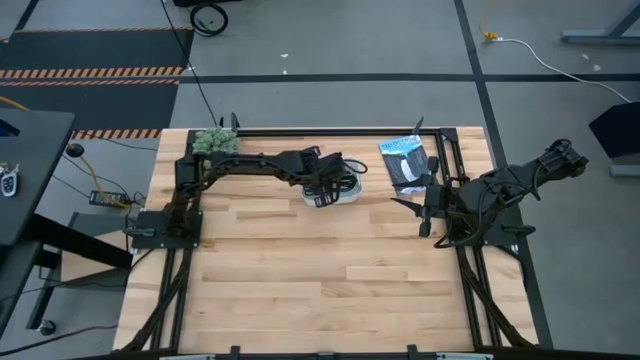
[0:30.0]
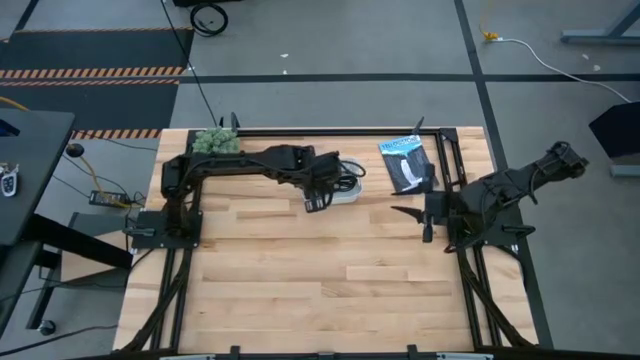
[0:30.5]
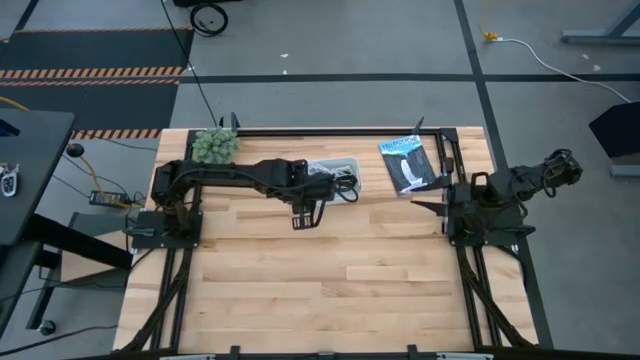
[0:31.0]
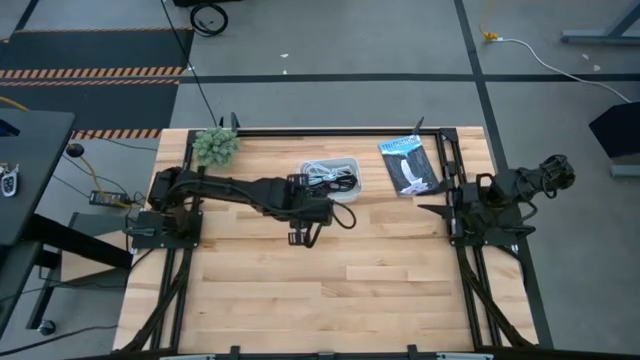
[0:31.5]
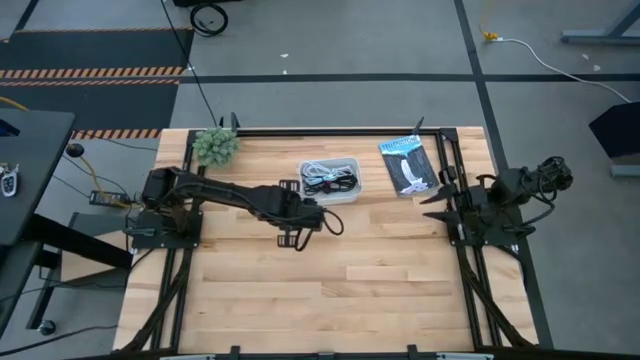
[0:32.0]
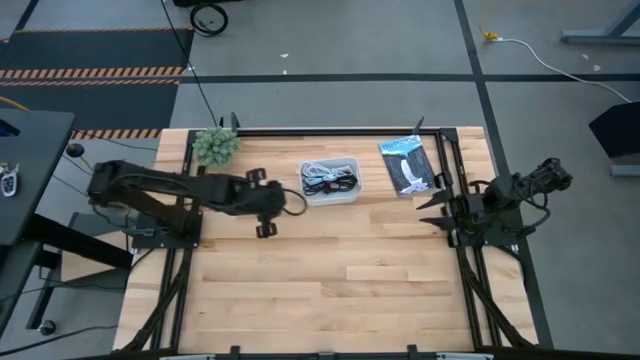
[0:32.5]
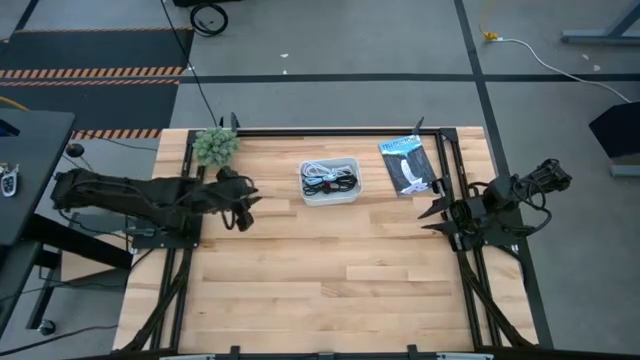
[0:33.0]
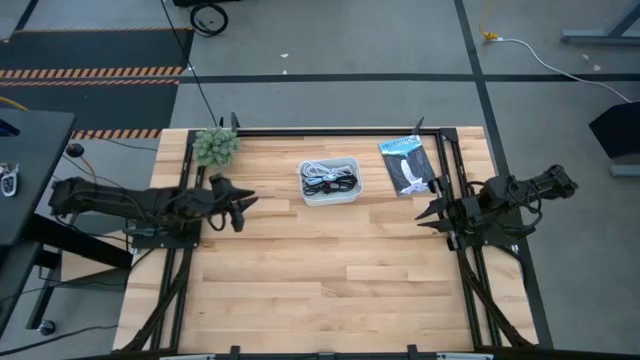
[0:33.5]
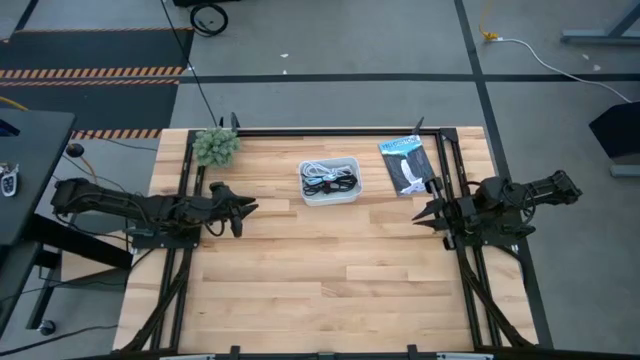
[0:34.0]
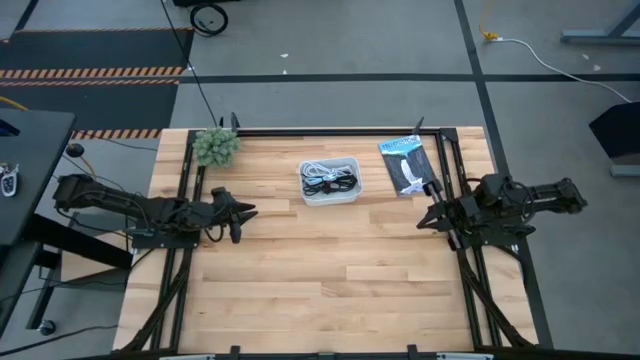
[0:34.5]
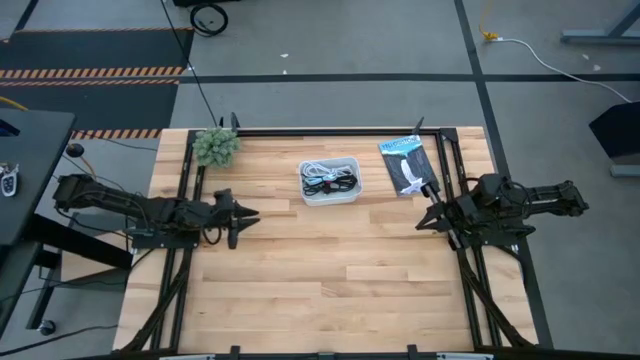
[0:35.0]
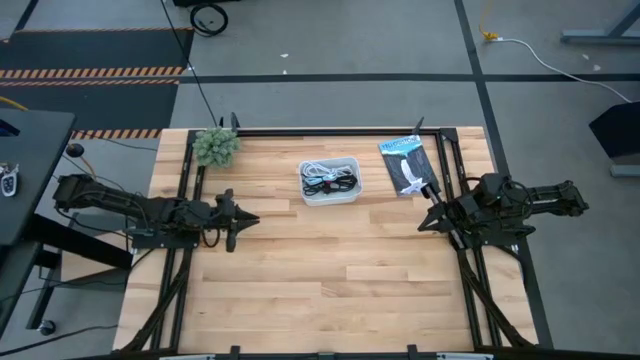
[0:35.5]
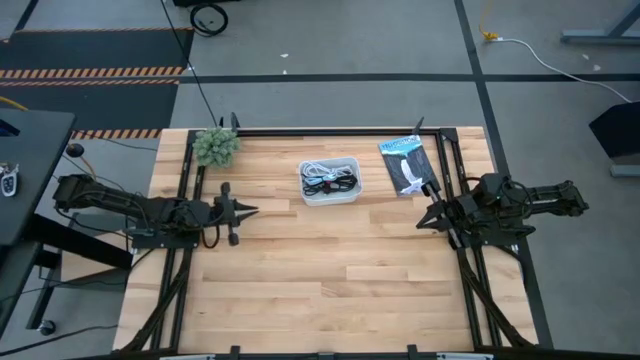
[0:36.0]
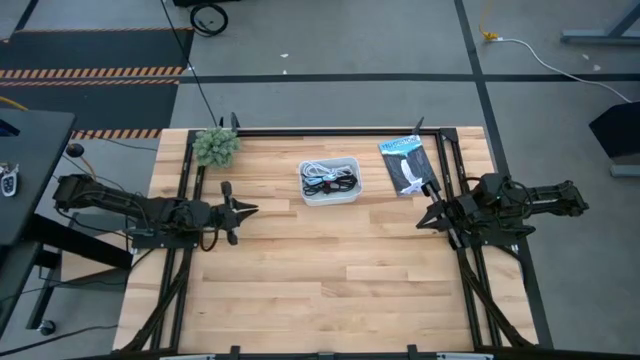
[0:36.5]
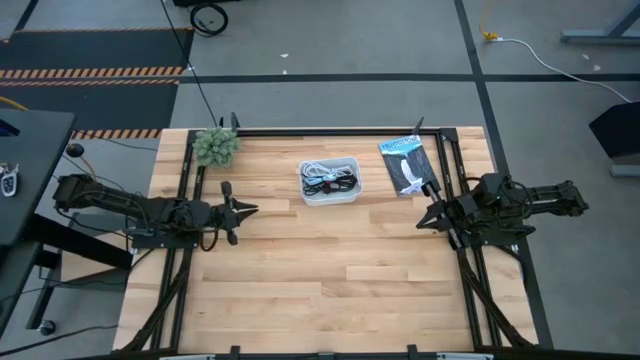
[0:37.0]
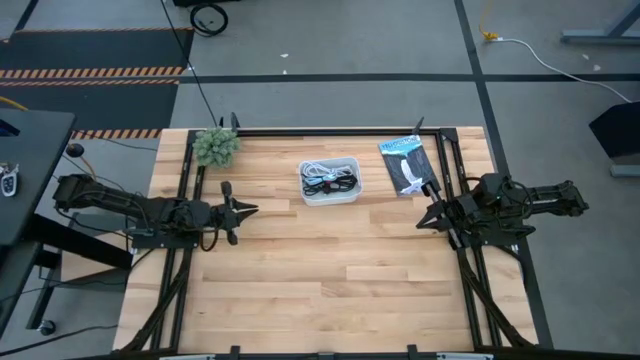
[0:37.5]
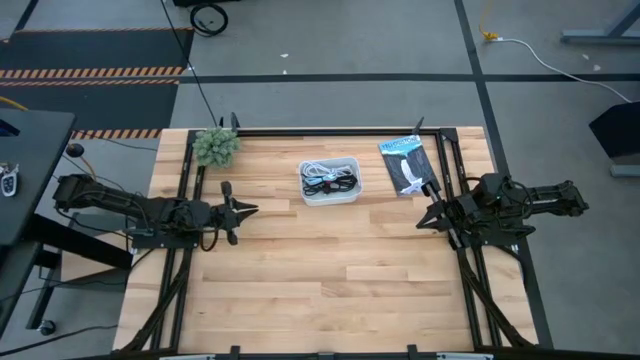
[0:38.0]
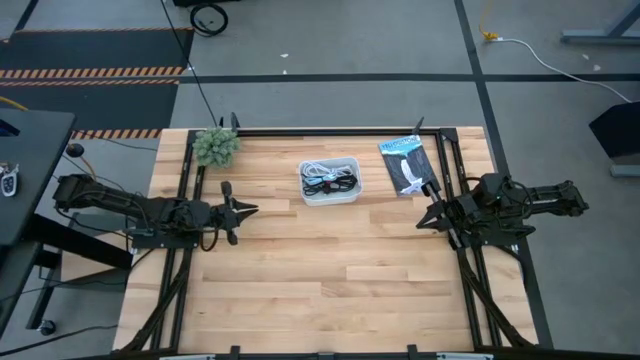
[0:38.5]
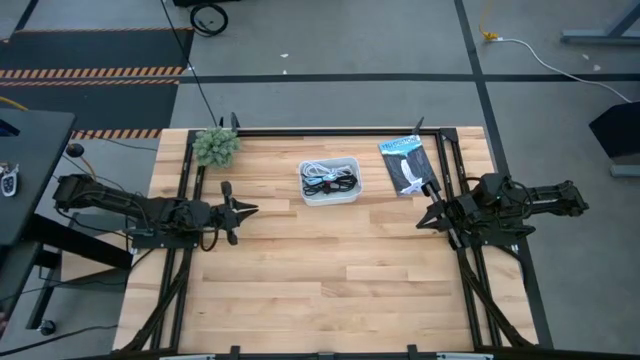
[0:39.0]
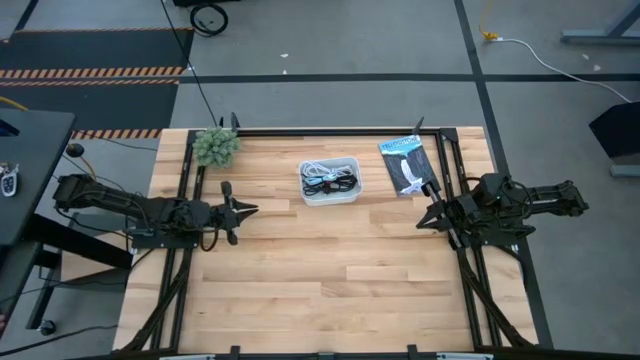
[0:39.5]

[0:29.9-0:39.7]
Task: Pick and place USB-C Cables
Return to Home Position

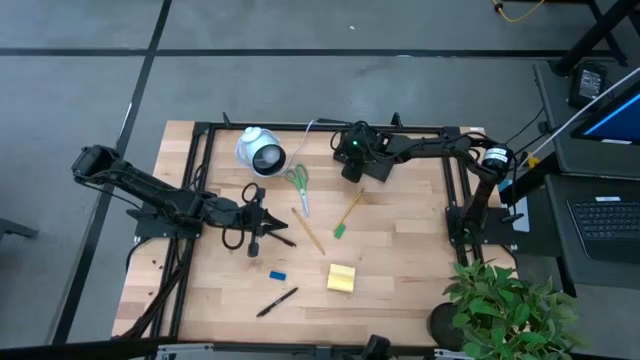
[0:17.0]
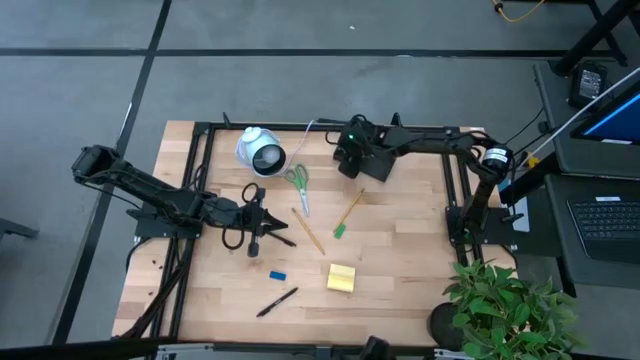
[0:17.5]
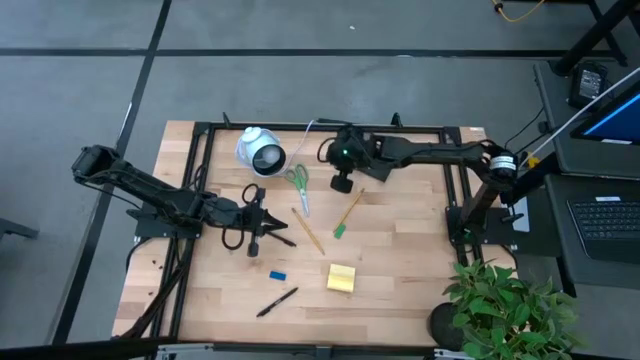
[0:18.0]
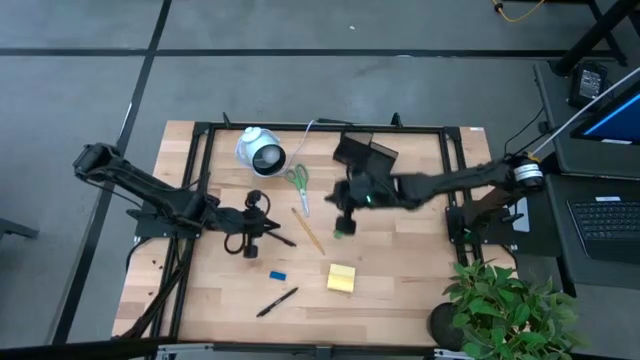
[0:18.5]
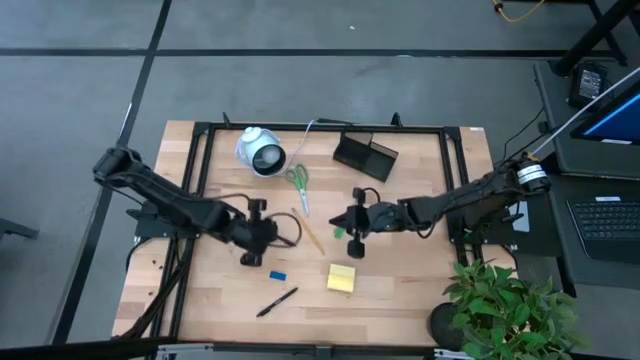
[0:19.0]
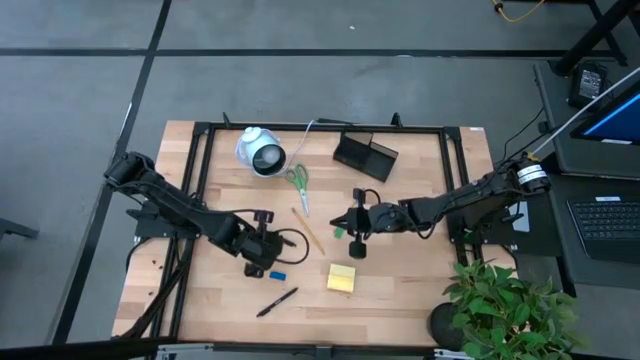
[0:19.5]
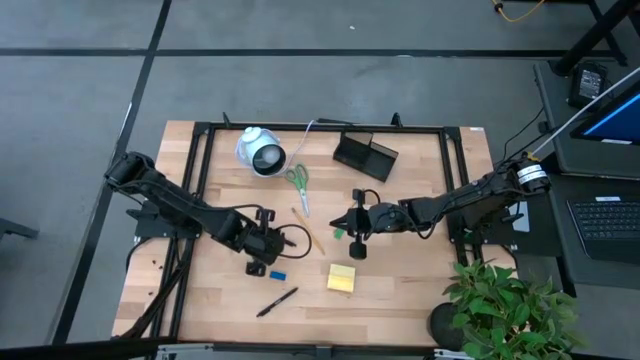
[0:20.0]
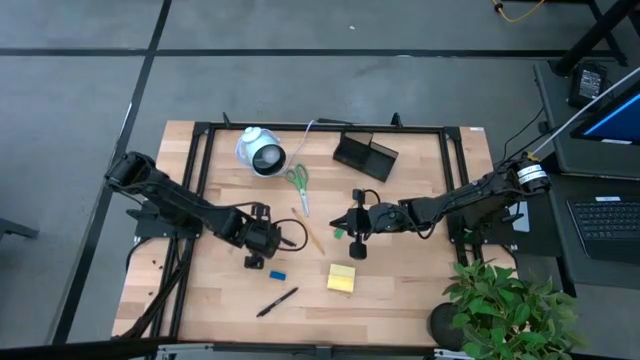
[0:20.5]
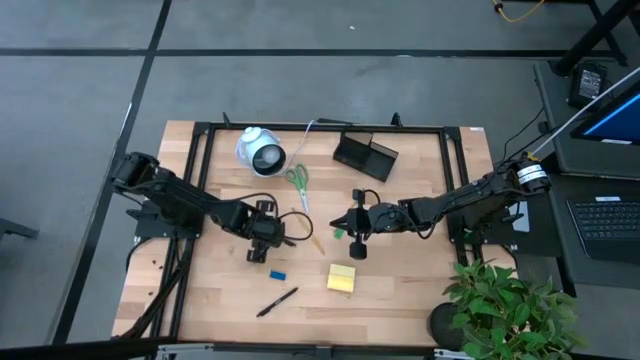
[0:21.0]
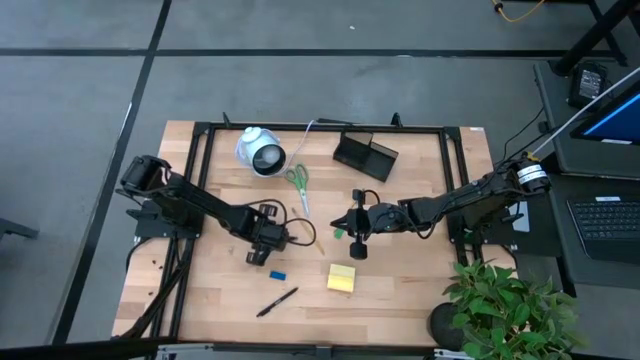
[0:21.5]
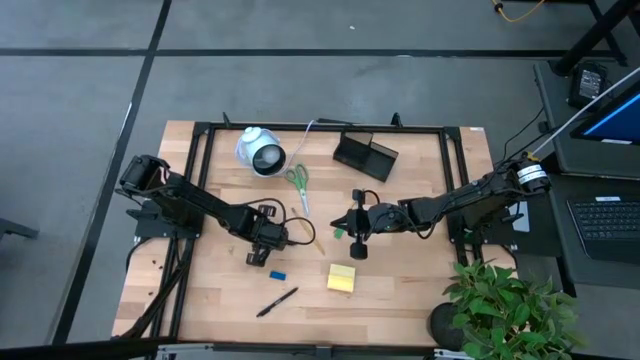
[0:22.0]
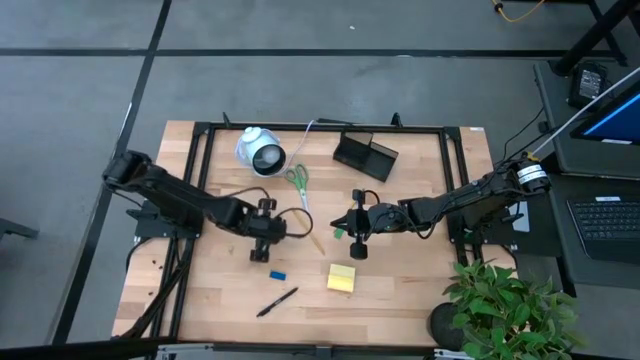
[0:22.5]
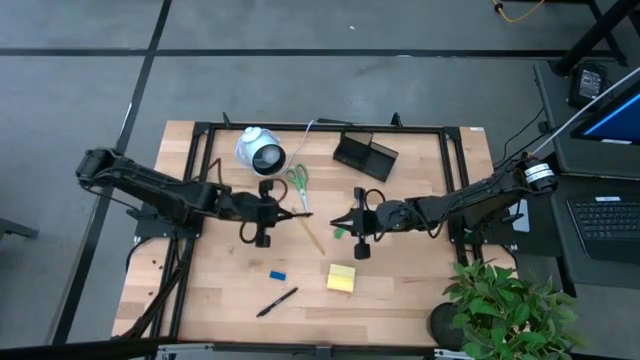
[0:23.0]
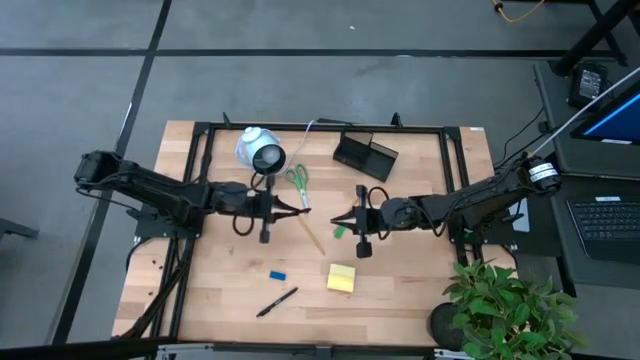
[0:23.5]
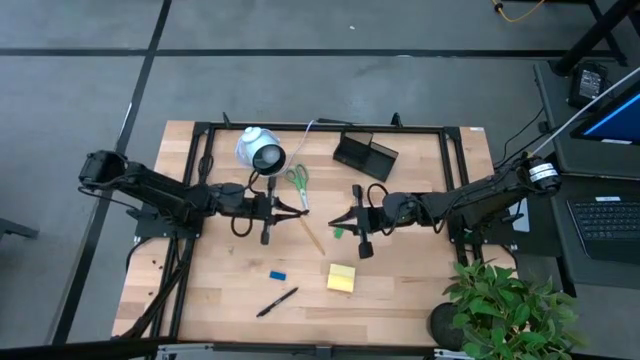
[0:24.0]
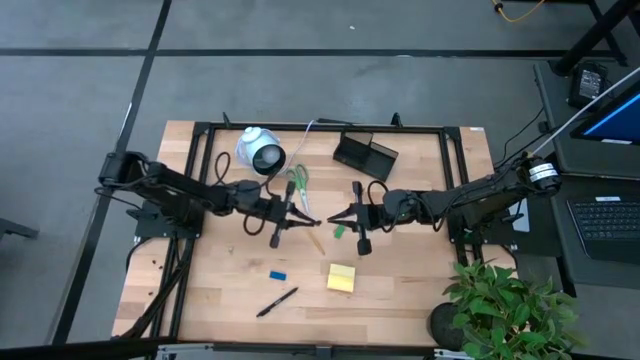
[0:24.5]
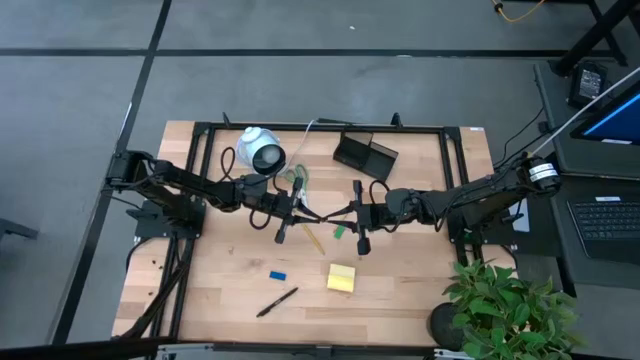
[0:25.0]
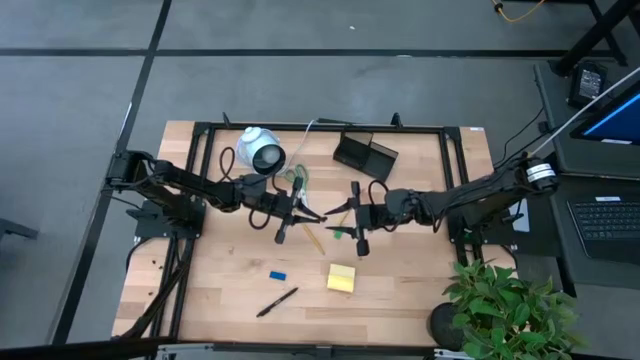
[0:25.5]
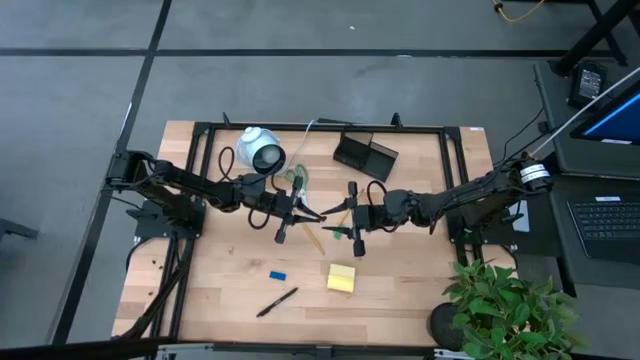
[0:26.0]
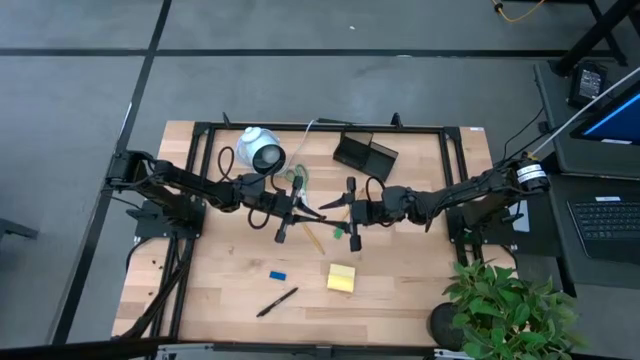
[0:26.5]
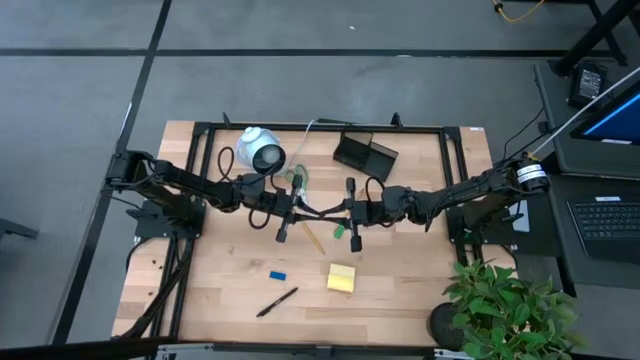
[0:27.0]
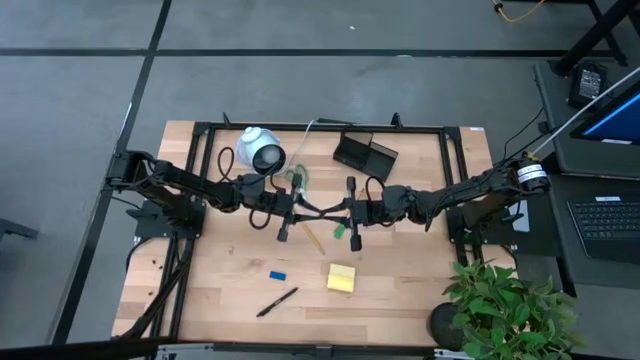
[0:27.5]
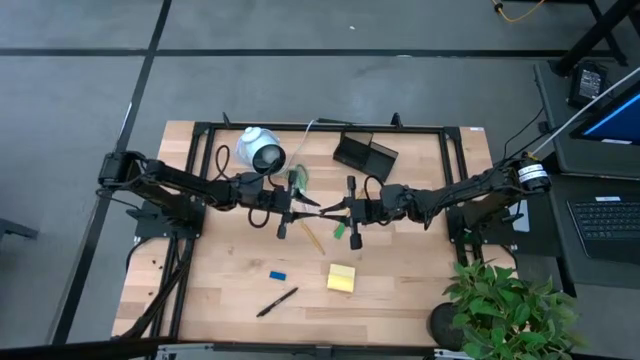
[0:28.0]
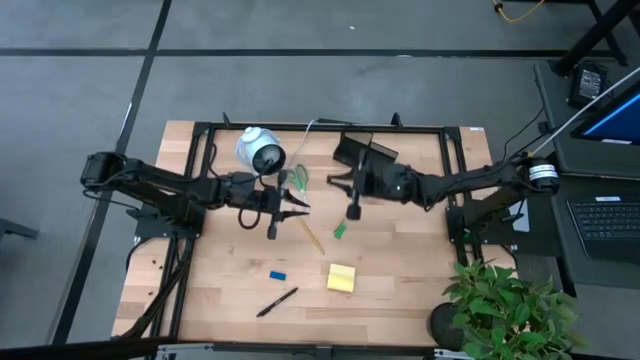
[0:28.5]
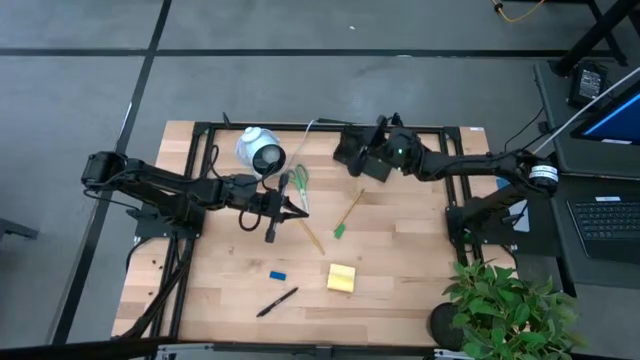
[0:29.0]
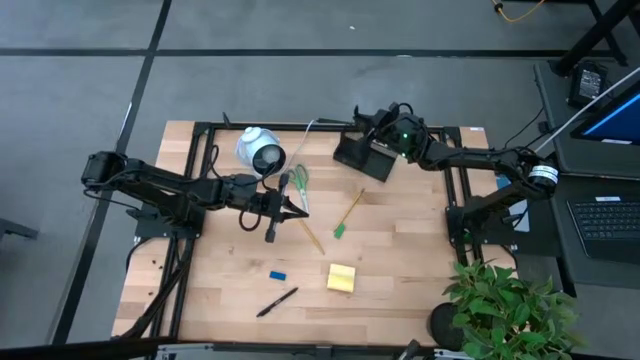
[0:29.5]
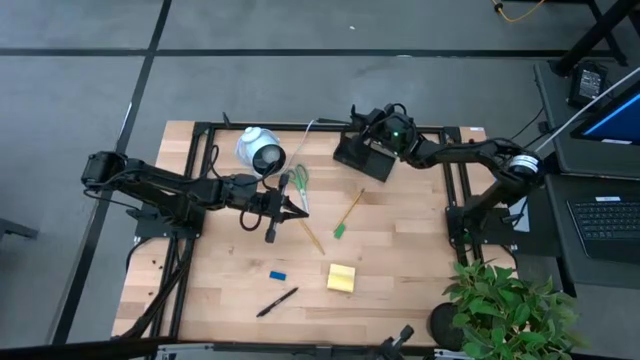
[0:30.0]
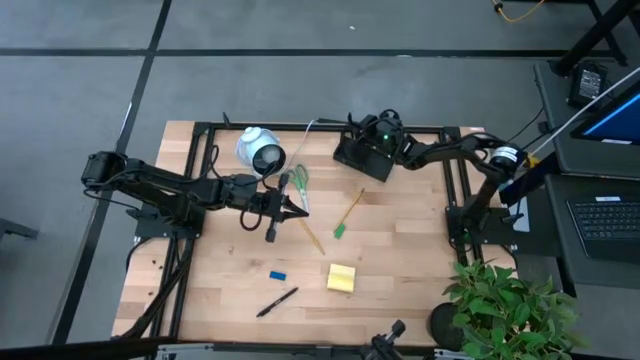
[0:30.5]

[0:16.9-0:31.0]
Task: Pick and place office supplies into organizer
Put the top black pen into the desk organizer
